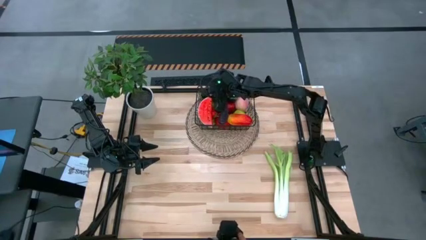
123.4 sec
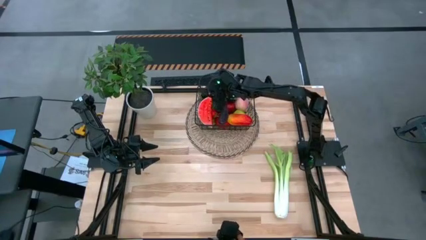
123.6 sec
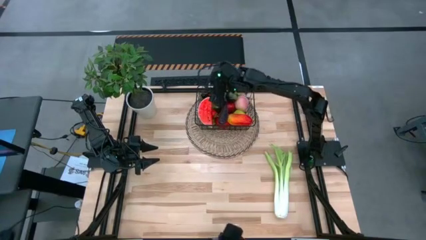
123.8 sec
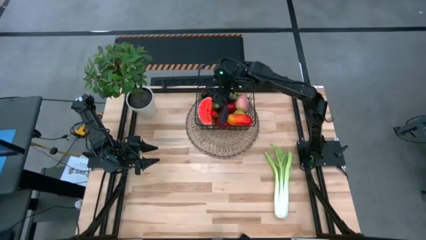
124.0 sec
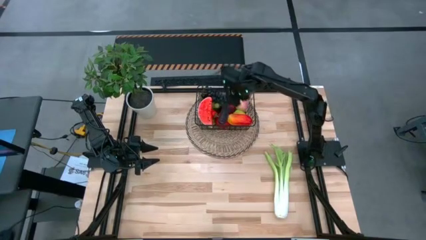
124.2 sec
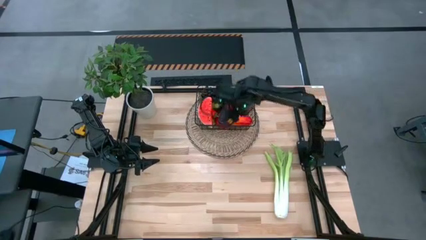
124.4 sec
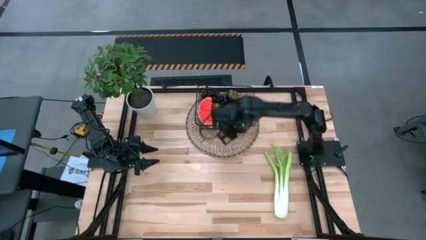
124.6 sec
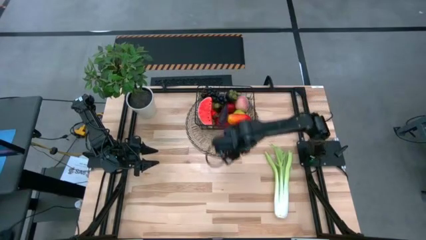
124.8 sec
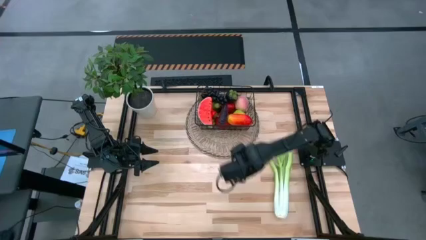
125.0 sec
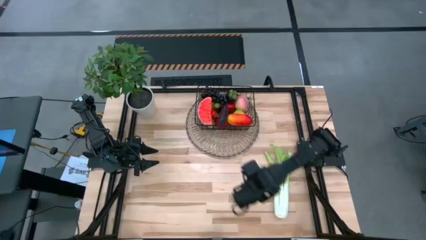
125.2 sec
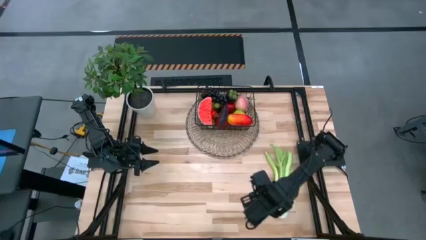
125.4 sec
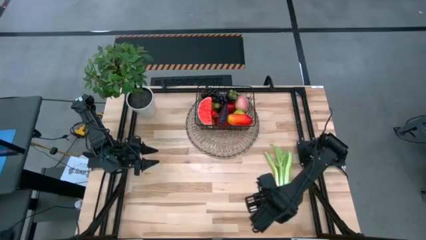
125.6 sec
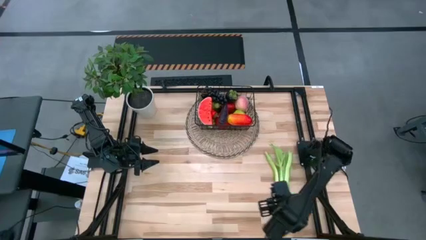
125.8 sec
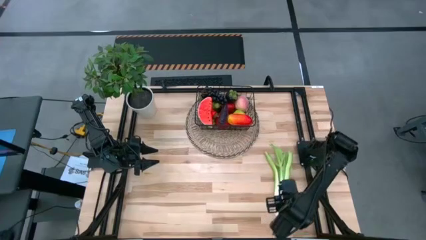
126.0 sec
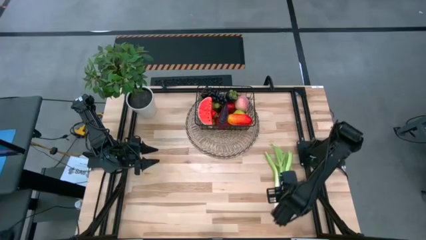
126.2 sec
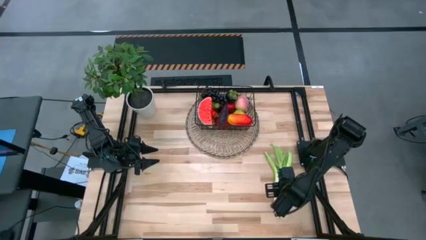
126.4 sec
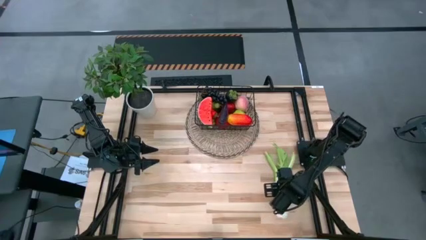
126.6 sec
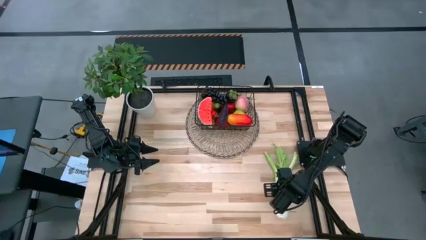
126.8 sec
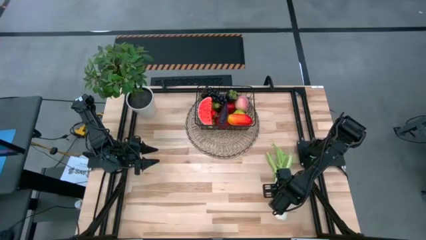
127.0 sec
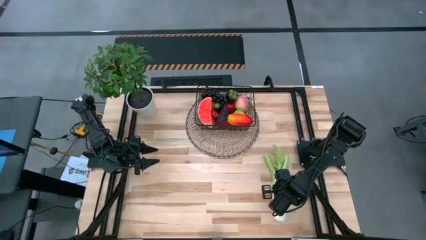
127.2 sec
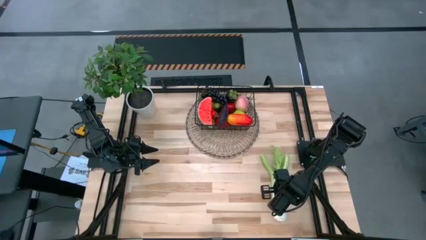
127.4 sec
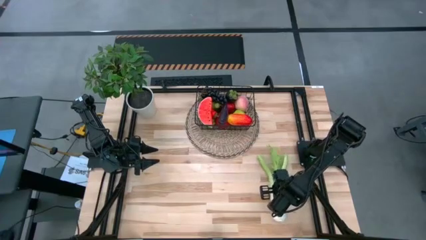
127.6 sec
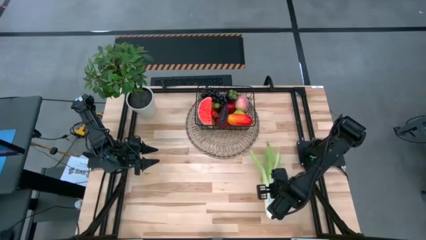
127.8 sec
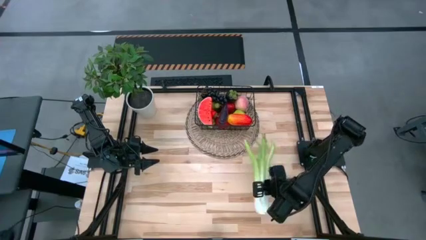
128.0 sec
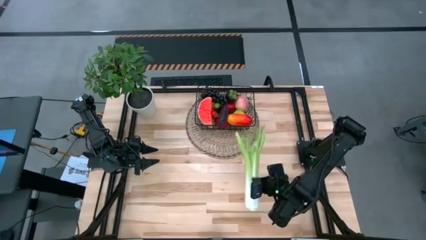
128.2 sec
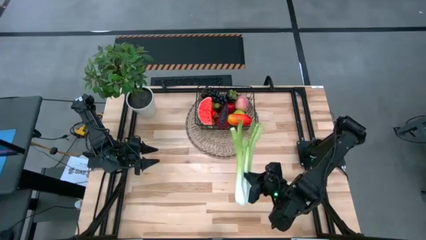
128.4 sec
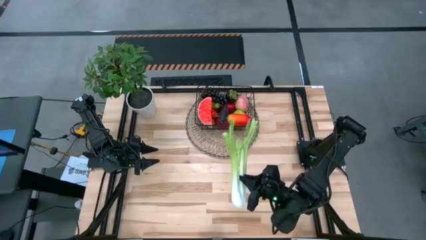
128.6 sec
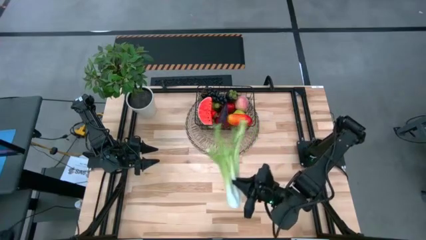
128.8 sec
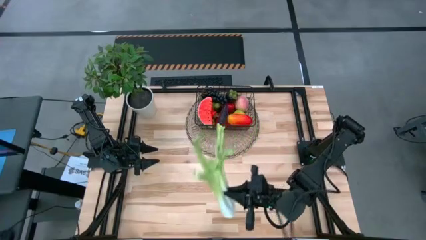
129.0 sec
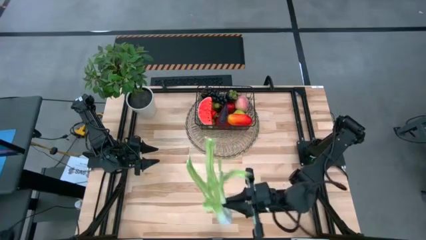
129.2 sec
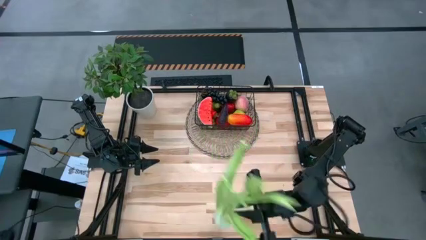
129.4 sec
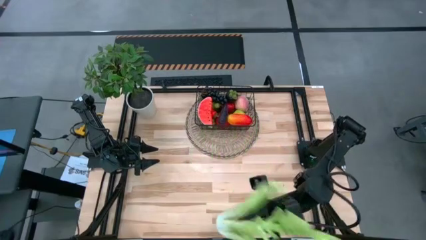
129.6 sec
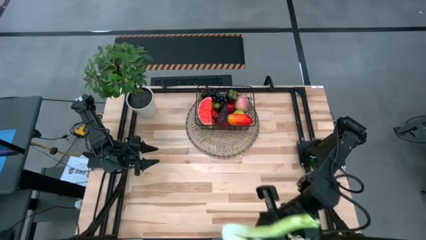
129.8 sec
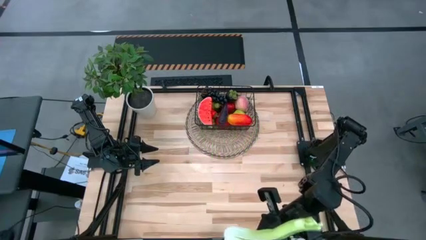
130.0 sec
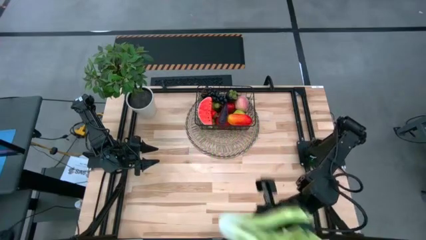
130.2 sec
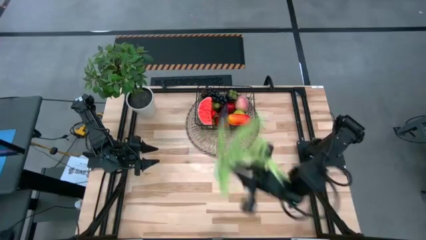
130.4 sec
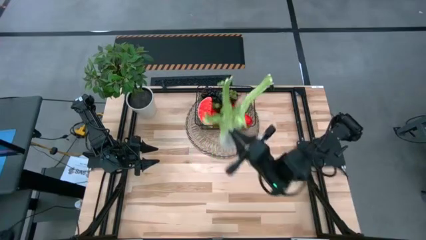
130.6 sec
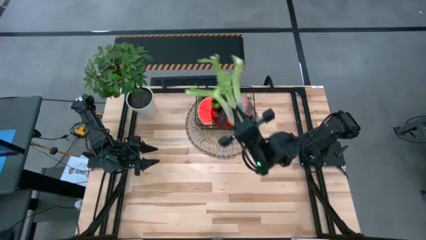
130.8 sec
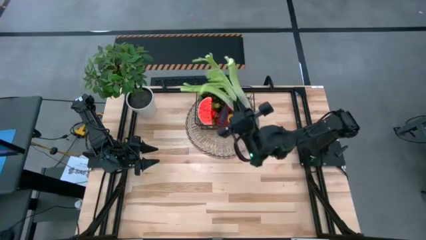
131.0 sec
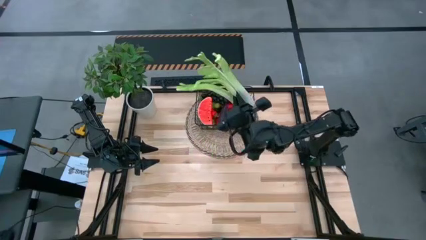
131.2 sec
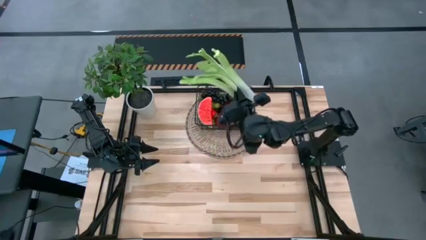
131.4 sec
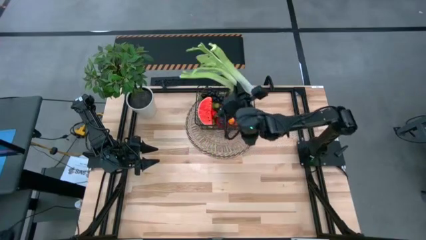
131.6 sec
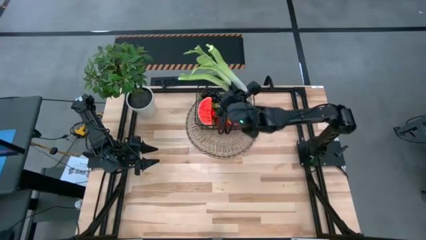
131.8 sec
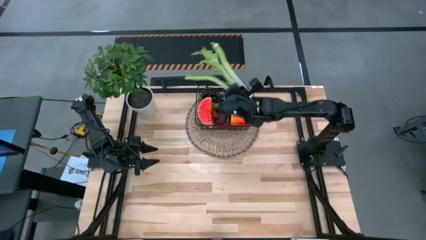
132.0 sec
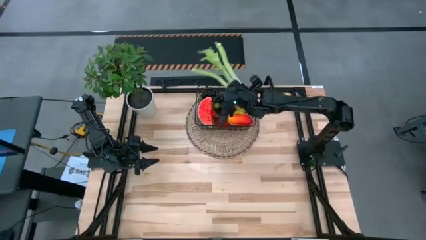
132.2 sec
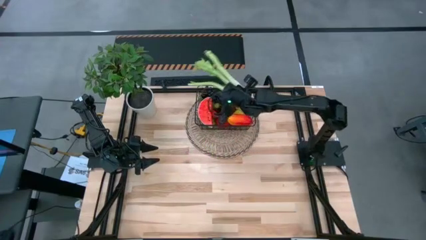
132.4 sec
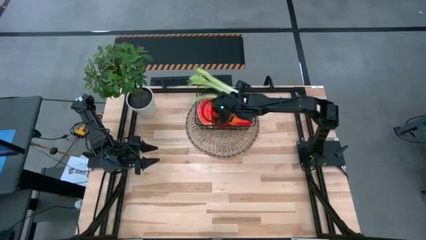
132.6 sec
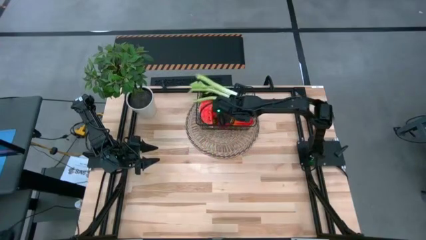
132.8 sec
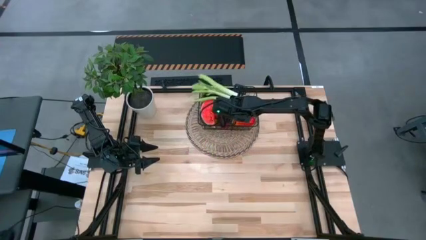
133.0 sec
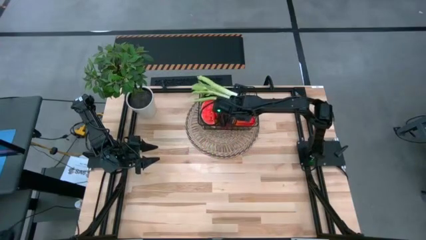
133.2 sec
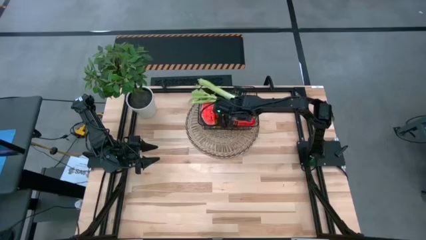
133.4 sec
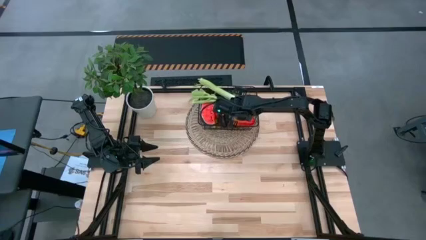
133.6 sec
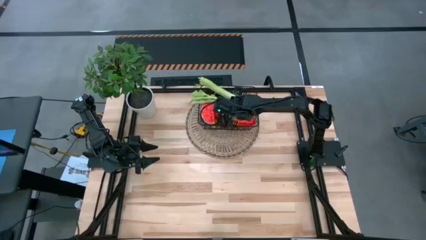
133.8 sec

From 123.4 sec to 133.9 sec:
Task: Build produce basket
Put the green celery into the black wire basket
